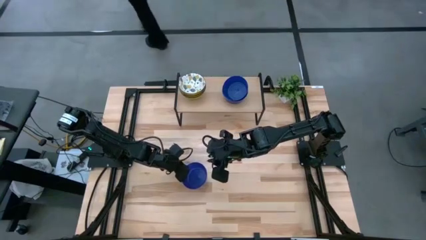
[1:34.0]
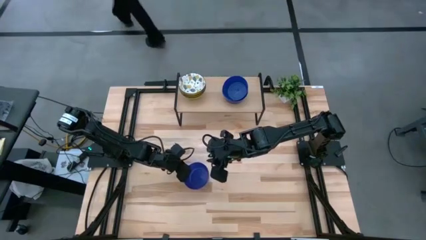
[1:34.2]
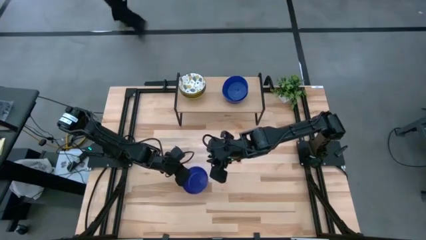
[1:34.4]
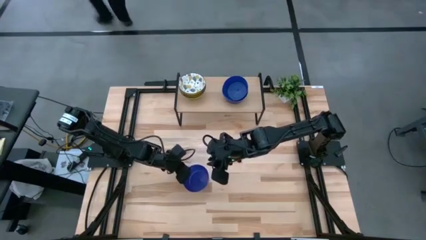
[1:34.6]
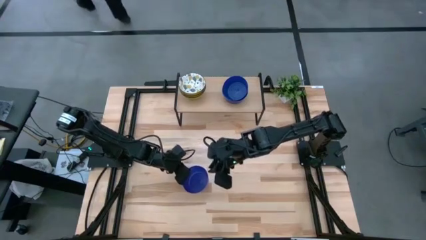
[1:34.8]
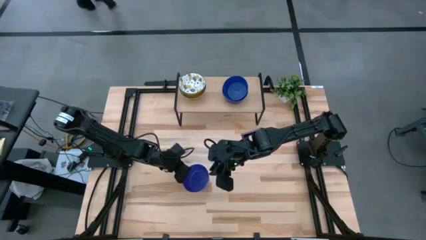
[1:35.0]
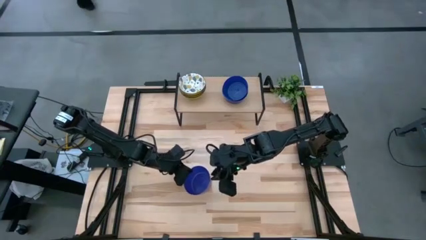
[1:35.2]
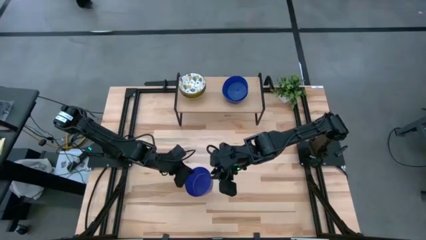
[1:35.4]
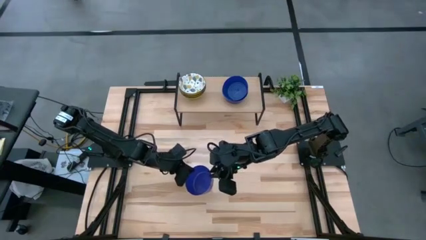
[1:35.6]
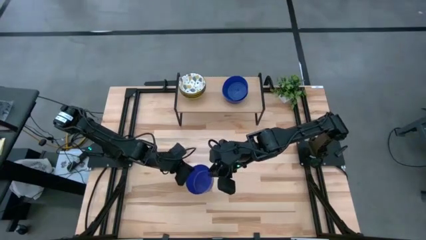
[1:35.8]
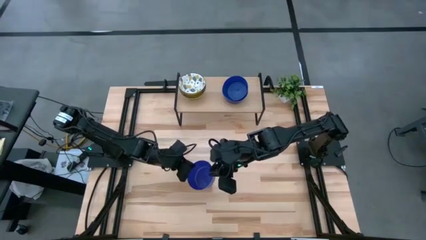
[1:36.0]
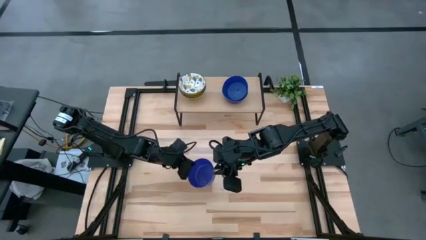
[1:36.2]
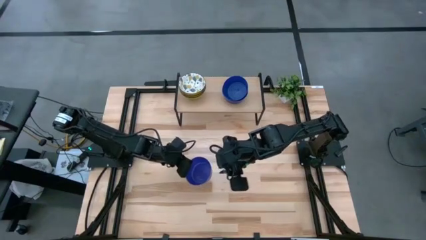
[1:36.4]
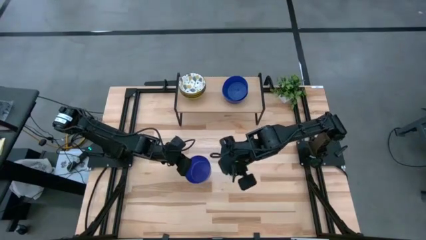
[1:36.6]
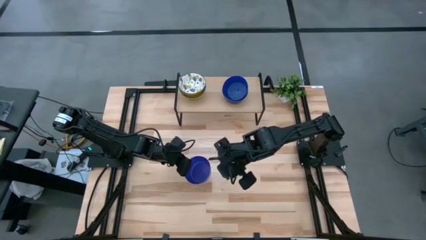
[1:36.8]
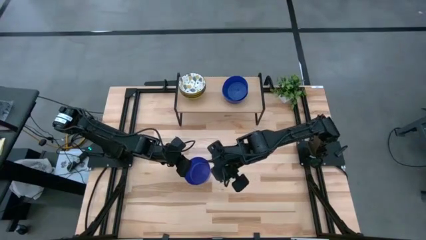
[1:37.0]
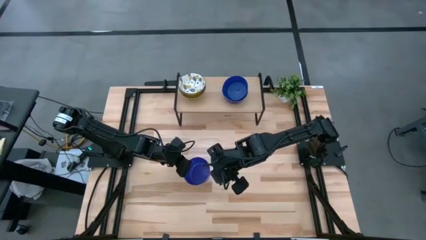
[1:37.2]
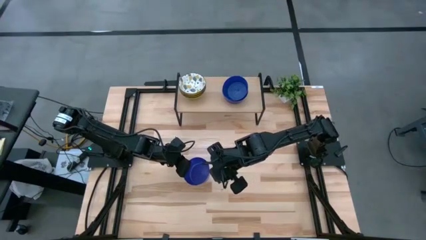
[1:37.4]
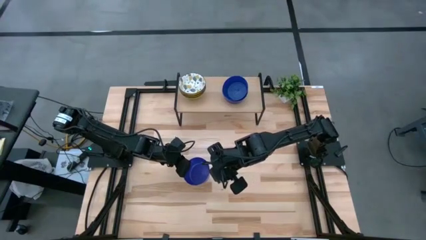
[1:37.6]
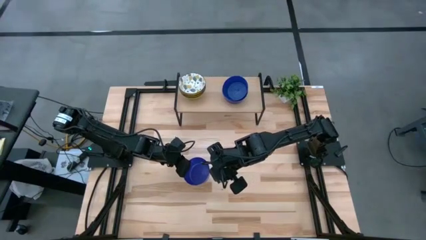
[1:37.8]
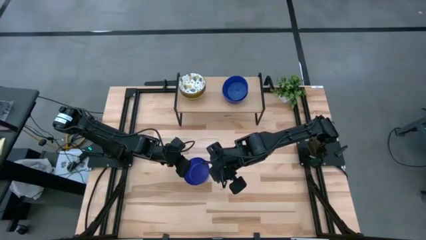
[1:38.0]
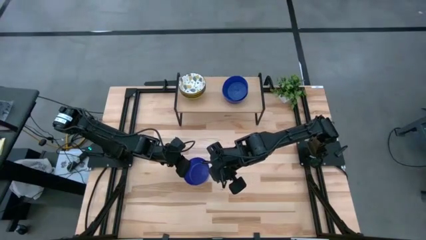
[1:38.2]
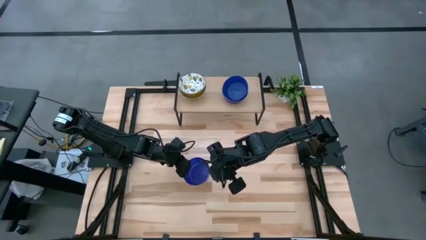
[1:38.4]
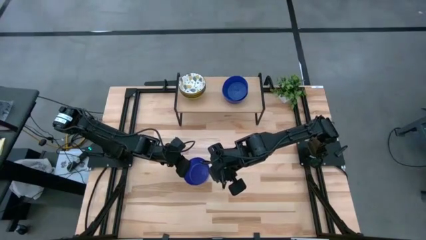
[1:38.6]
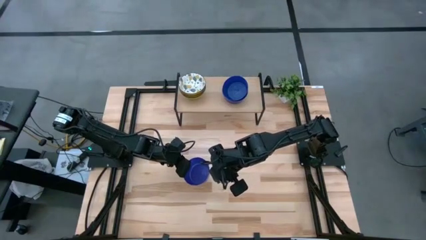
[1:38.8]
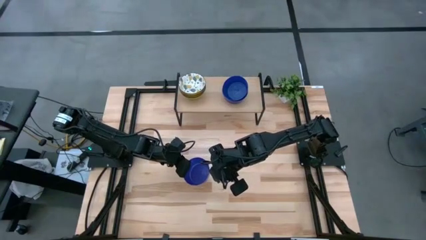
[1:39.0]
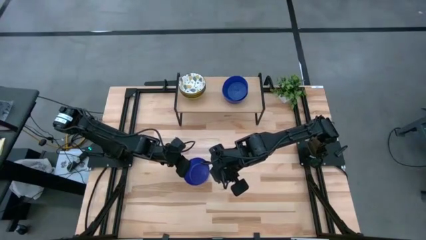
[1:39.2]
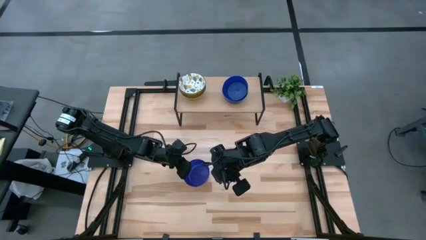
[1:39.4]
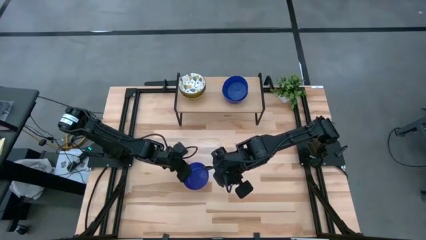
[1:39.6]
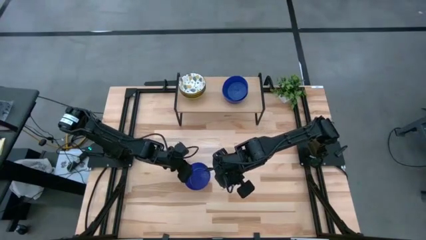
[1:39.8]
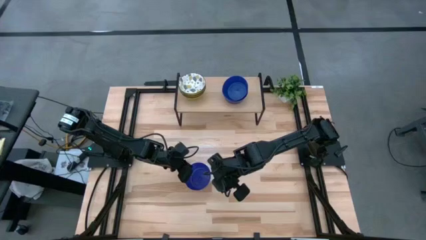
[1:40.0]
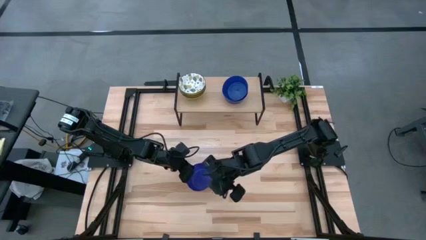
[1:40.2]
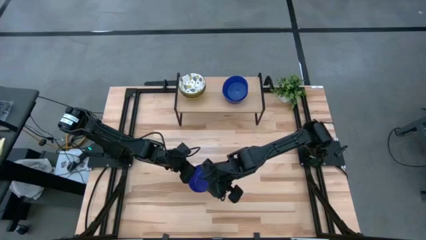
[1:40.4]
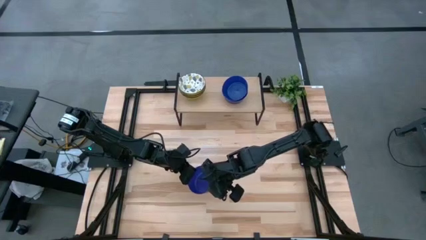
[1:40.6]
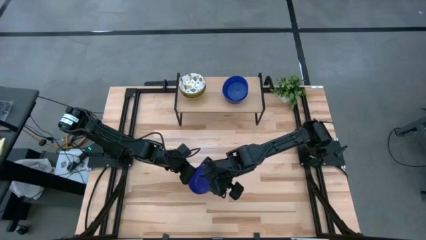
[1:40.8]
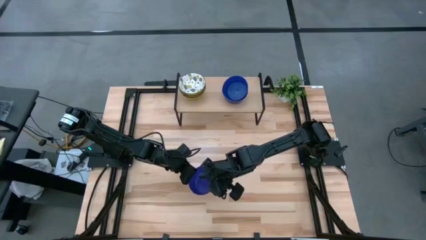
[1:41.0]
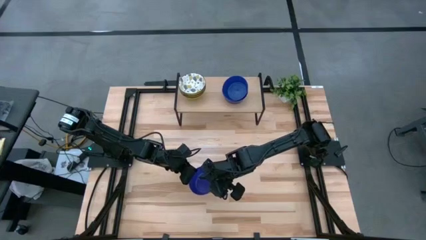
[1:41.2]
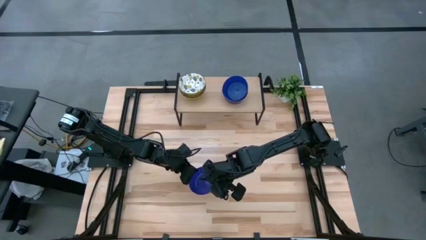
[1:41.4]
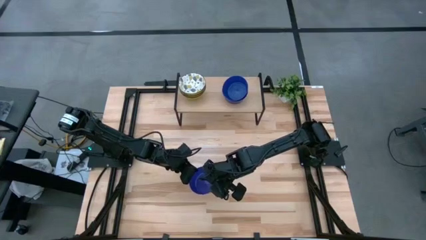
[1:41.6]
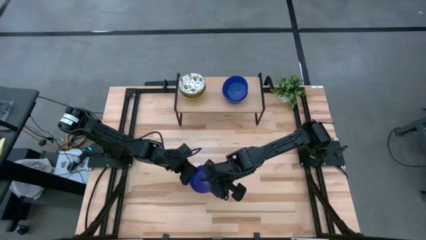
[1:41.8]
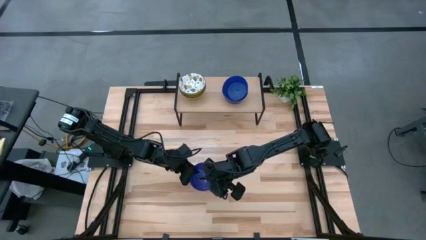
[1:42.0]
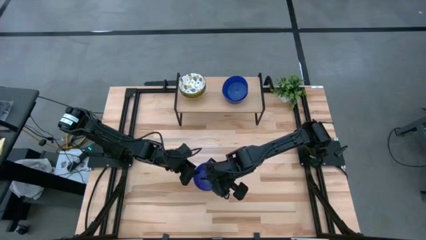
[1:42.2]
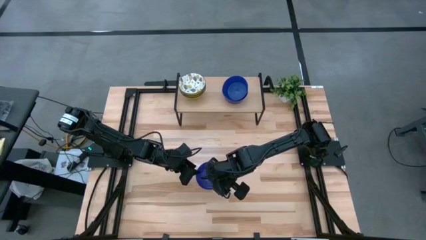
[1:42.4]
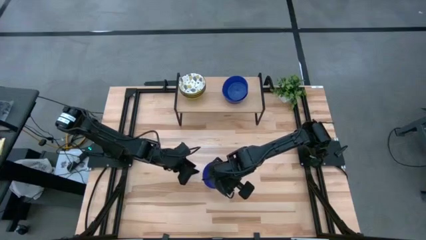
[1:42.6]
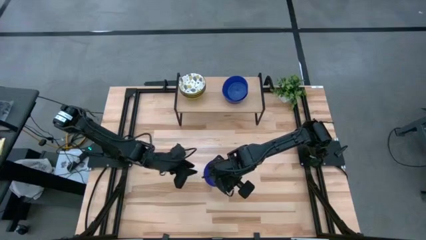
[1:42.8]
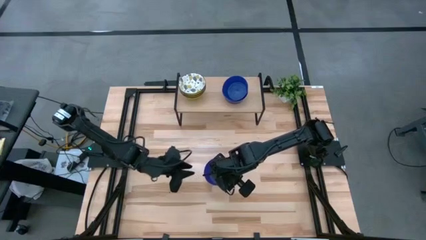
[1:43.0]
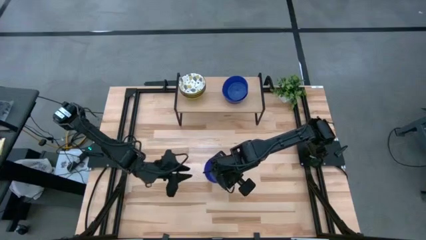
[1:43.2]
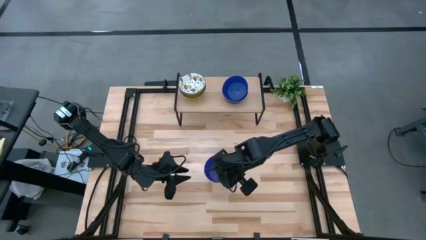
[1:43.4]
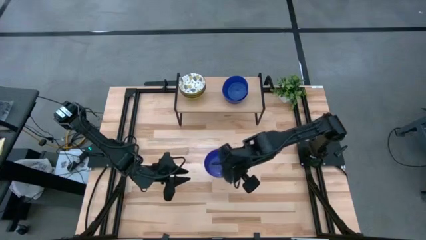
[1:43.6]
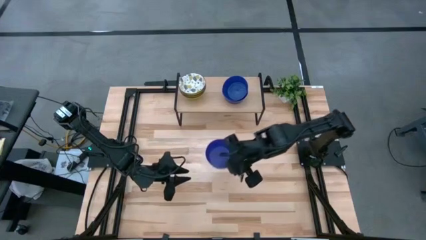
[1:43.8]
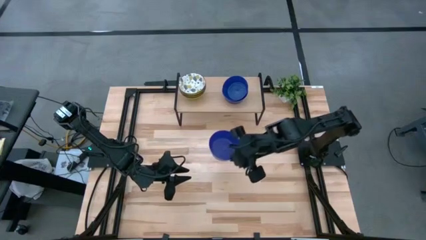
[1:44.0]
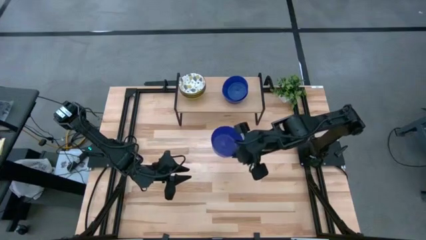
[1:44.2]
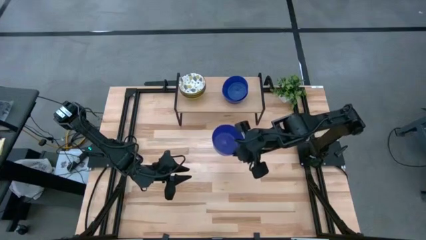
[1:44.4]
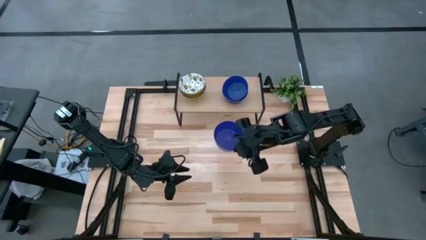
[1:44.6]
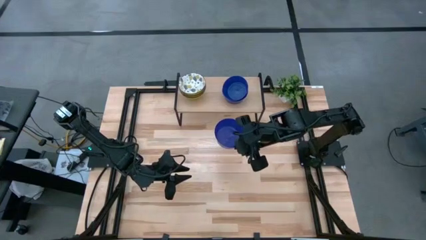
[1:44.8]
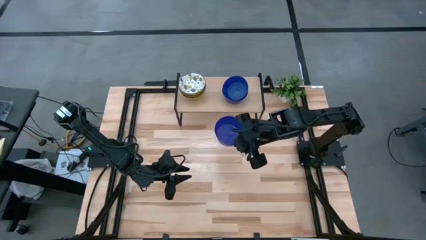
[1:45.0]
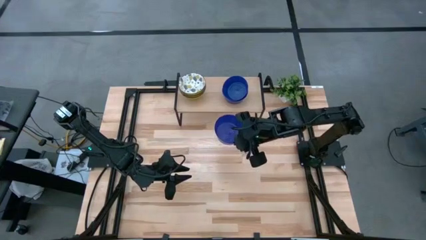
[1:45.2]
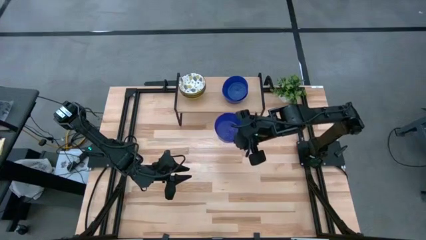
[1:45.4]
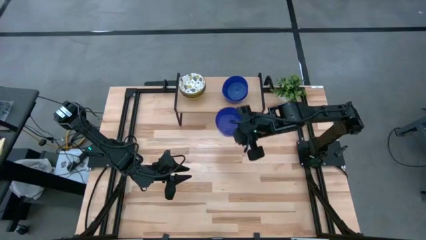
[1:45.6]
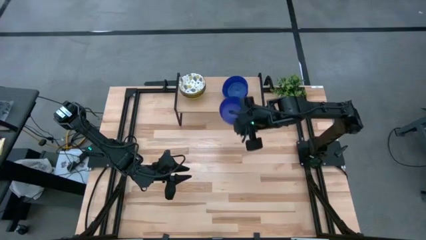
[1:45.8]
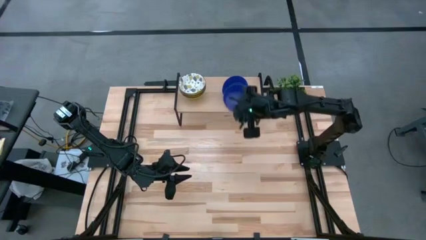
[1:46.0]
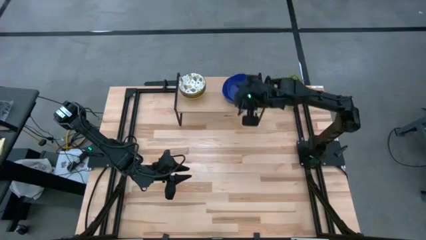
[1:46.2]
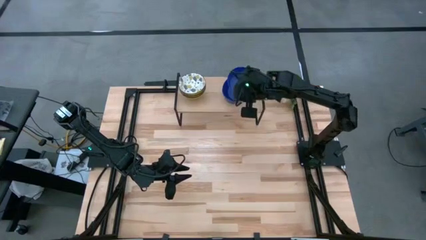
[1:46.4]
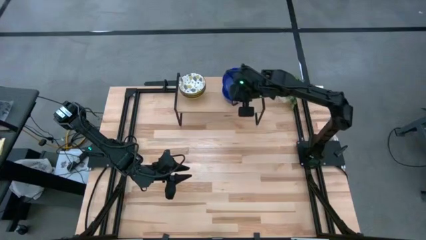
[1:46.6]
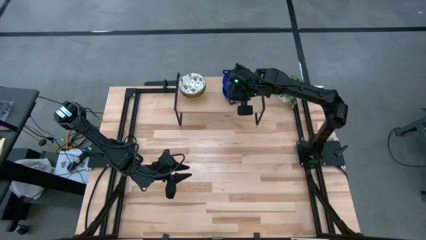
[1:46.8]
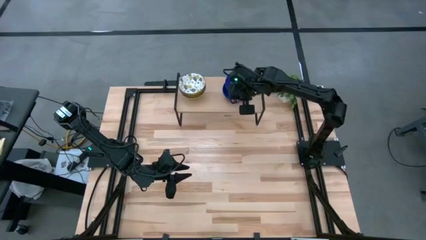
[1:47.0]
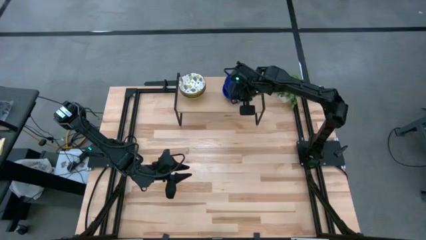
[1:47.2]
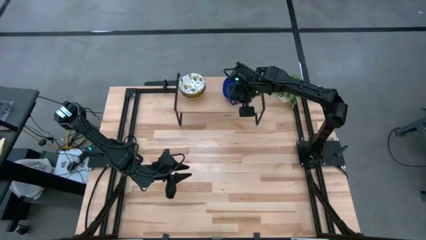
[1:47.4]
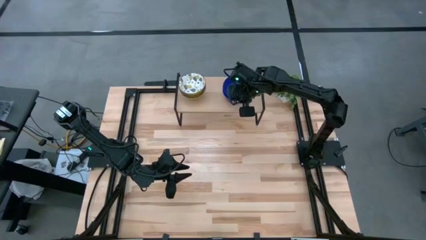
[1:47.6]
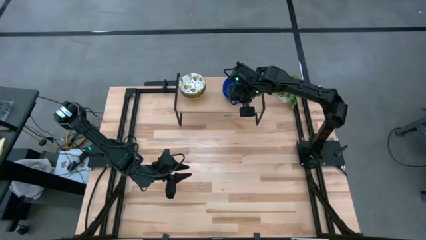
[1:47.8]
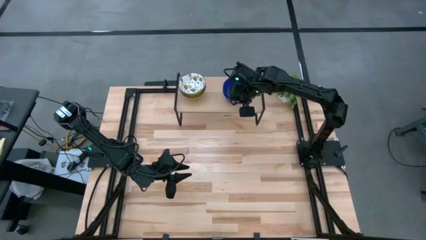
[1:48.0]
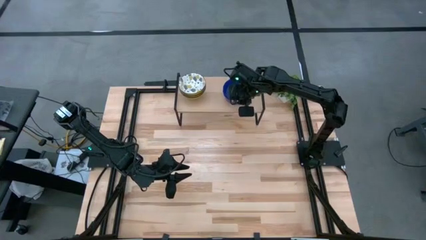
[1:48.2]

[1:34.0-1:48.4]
Task: Pick & Place Mini bowls
Stack the blue bowl on top of the blue bowl on the shelf
